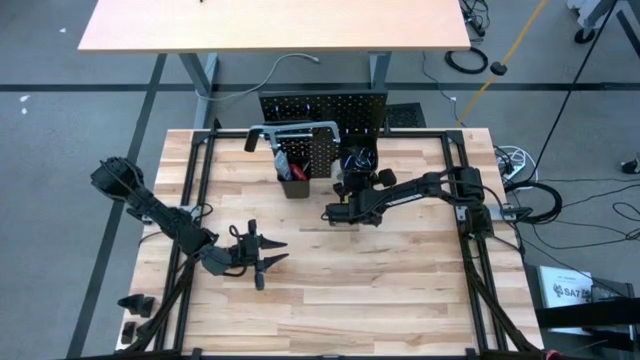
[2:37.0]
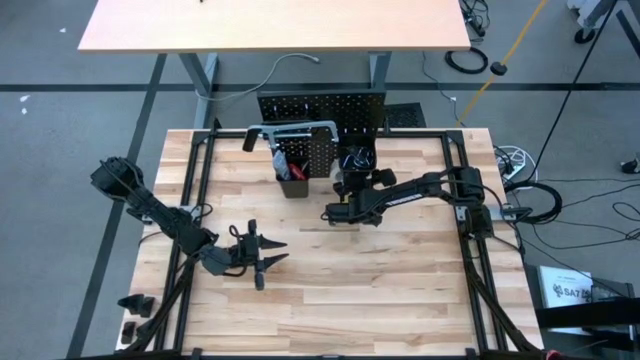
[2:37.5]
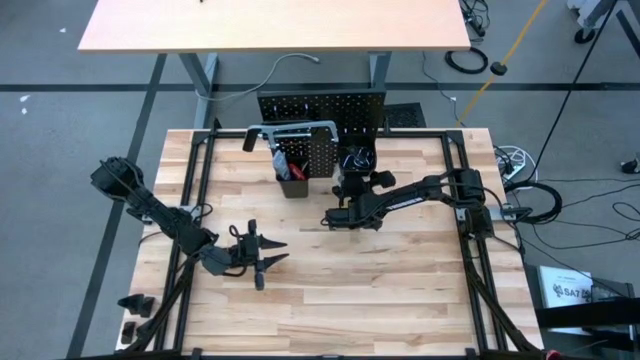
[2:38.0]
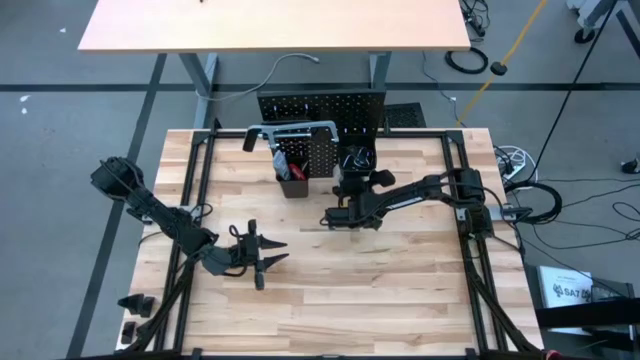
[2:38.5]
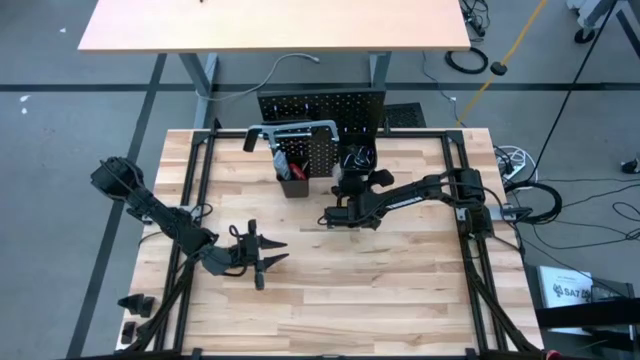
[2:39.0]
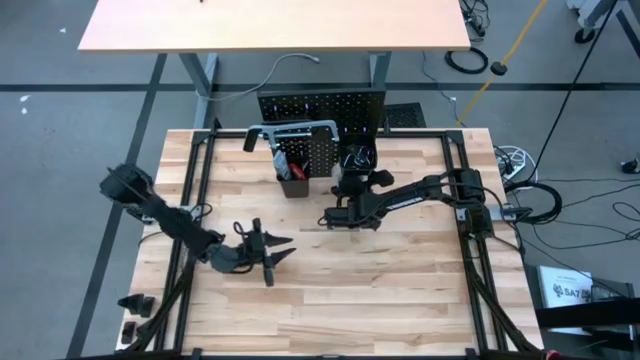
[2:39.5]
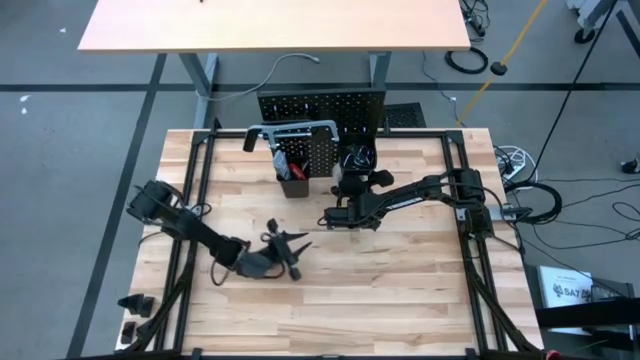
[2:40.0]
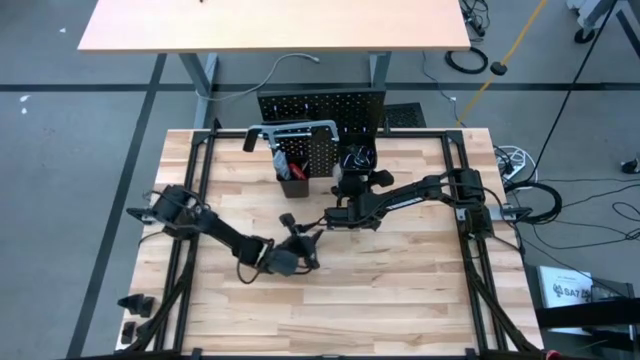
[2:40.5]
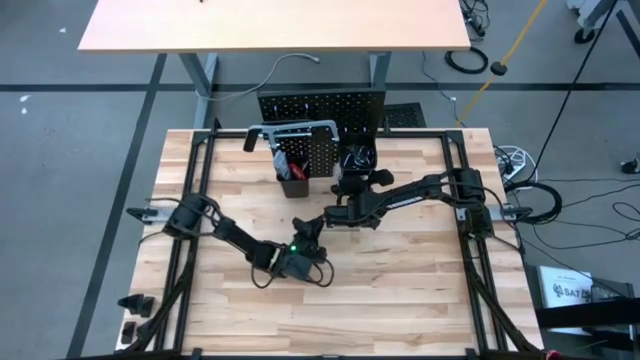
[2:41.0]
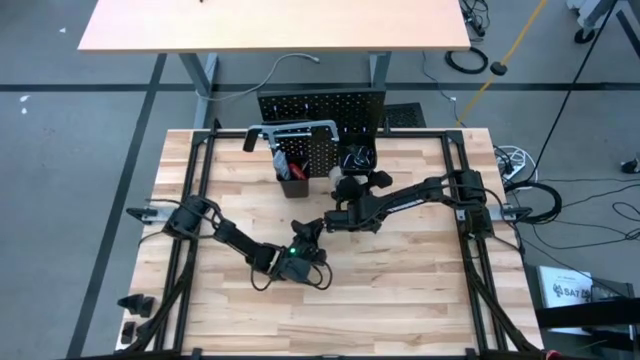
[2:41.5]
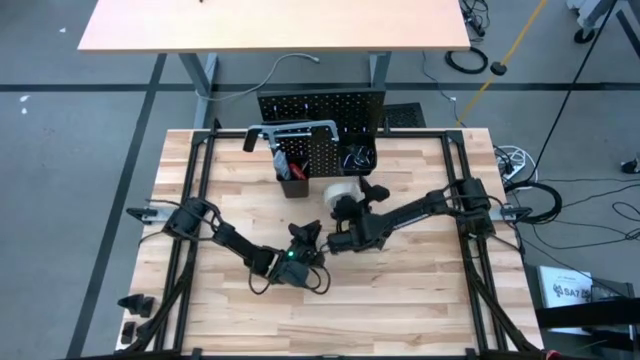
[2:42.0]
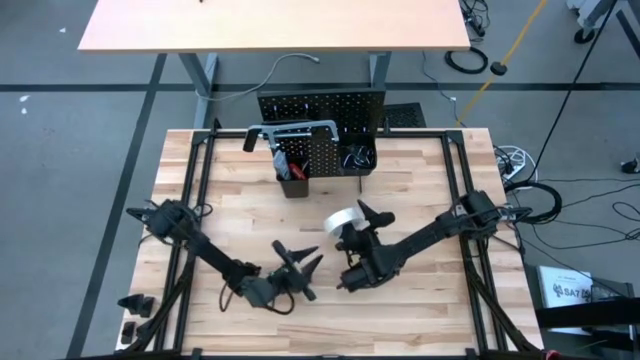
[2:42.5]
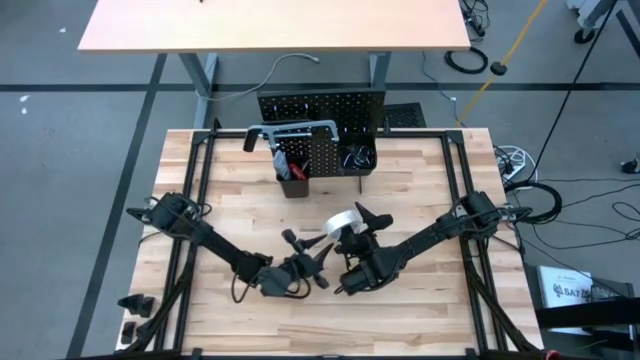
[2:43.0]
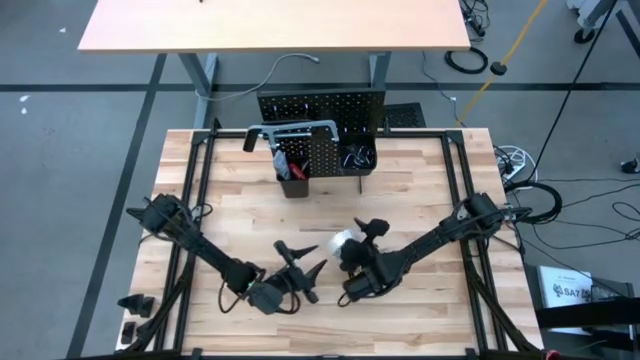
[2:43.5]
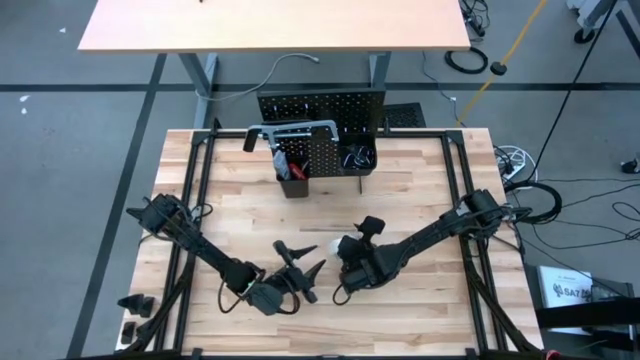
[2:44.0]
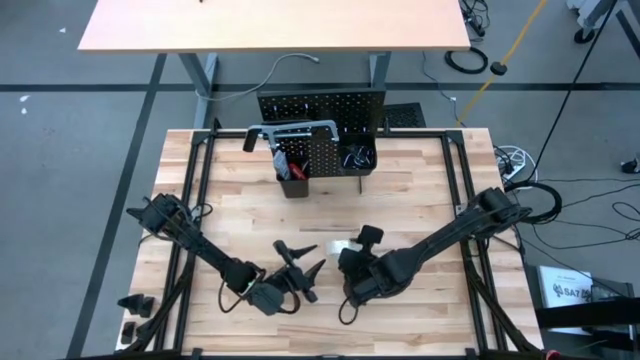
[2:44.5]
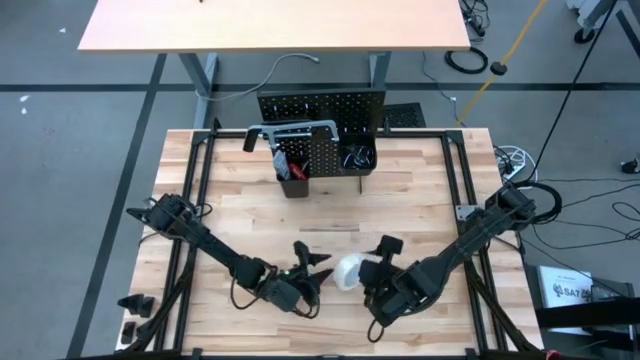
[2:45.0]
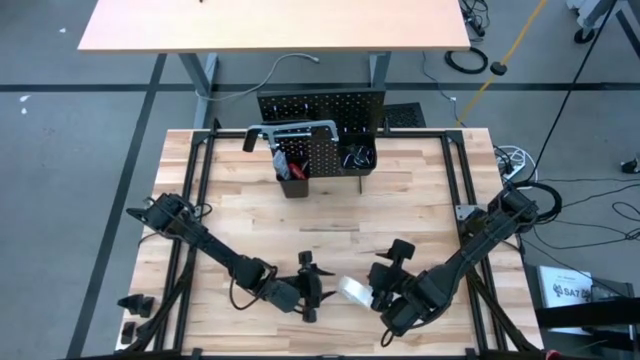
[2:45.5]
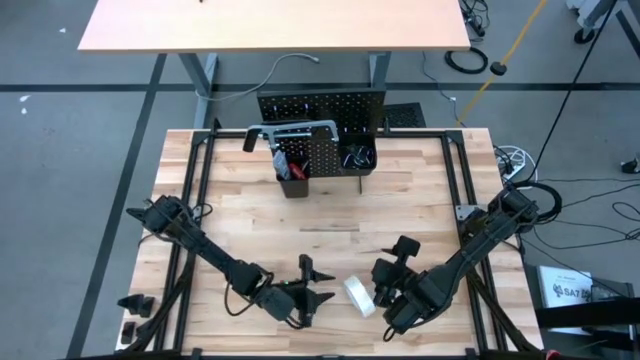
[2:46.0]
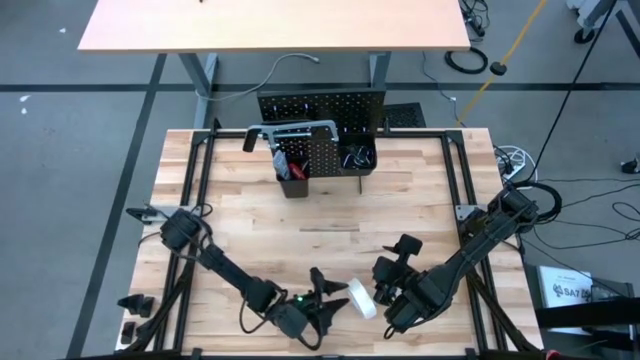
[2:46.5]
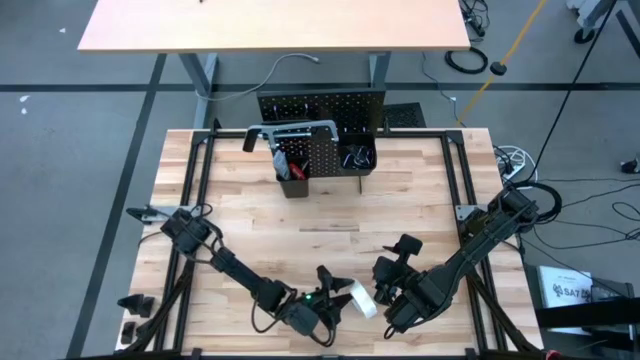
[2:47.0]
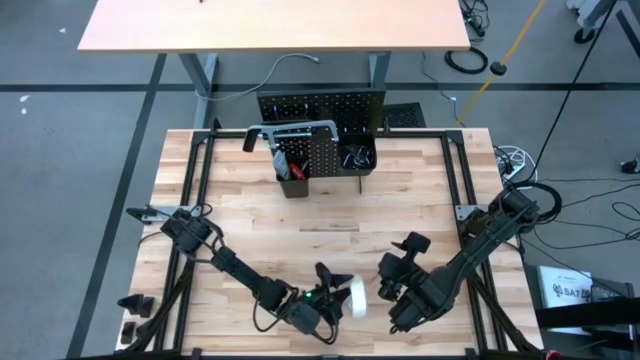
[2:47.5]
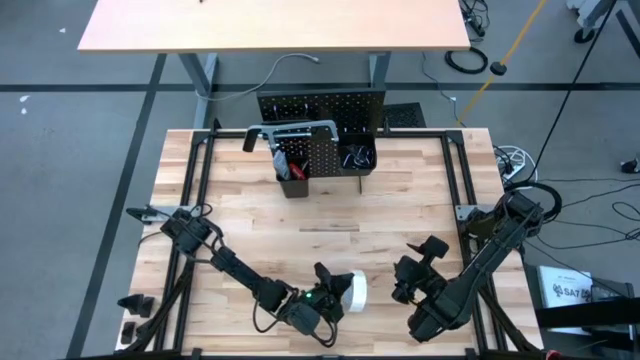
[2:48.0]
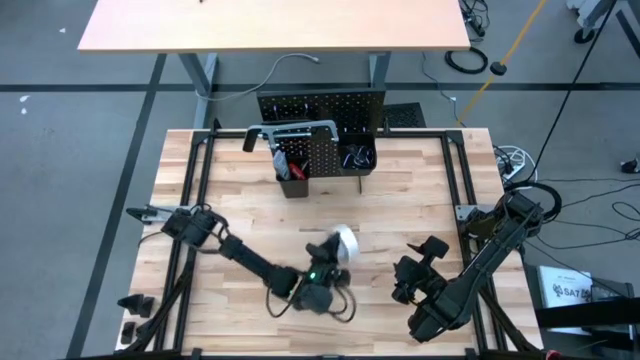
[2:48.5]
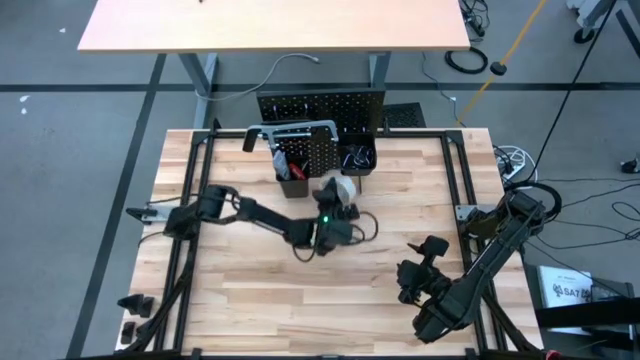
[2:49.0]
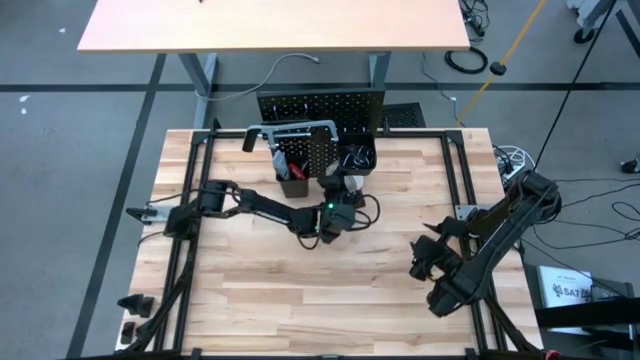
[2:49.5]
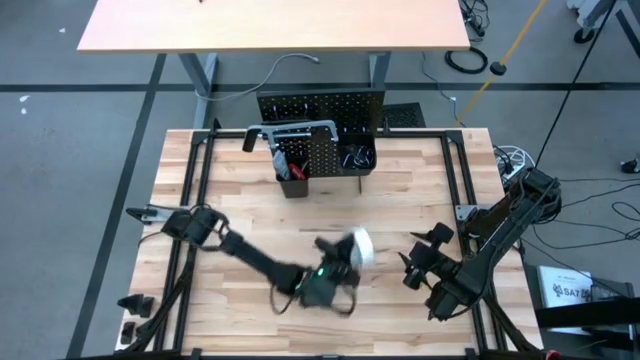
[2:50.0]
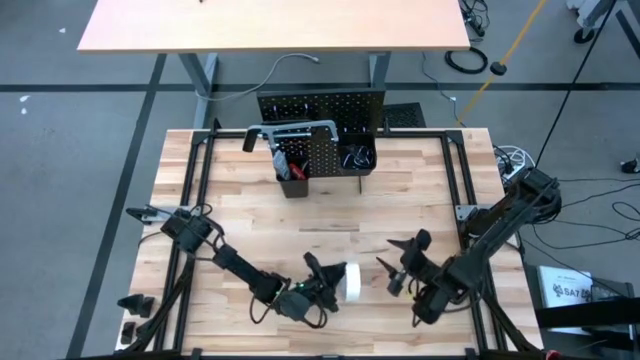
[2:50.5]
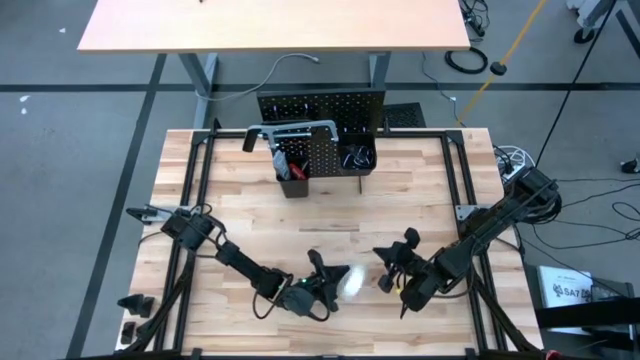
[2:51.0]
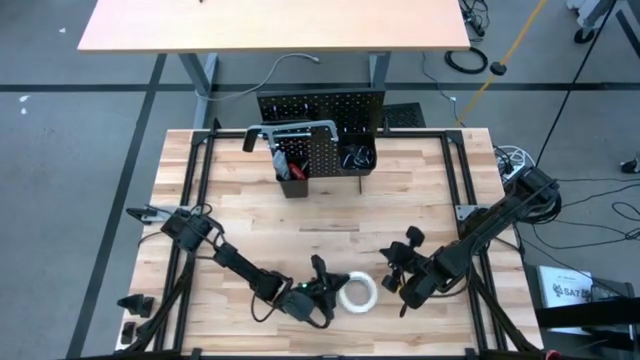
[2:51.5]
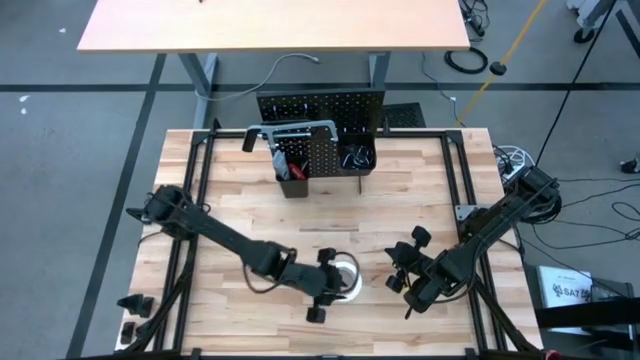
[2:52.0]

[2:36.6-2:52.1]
Task: Hang tools onto peg board
Hang the white tape on the peg board

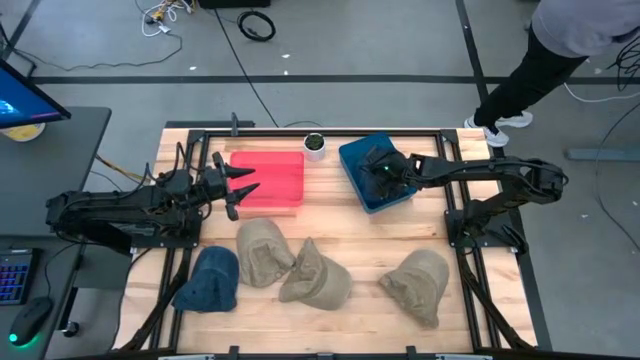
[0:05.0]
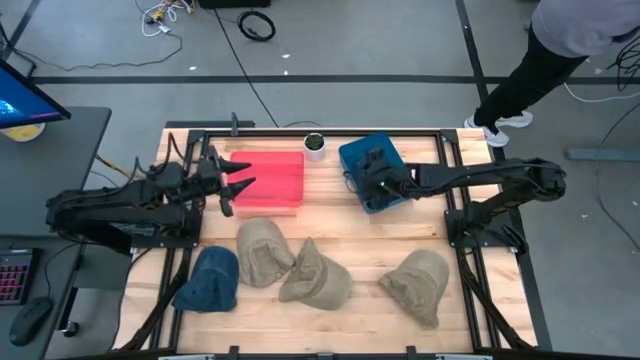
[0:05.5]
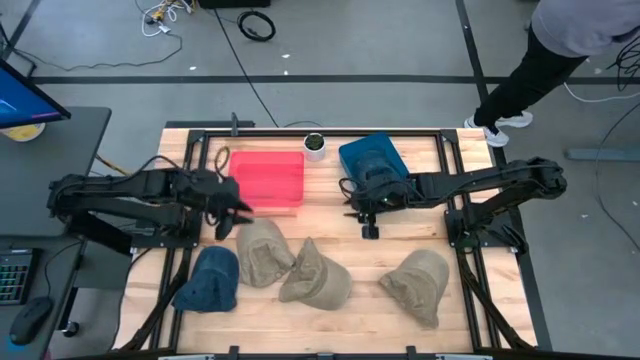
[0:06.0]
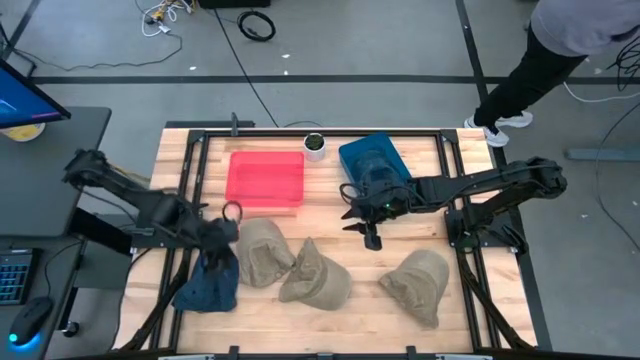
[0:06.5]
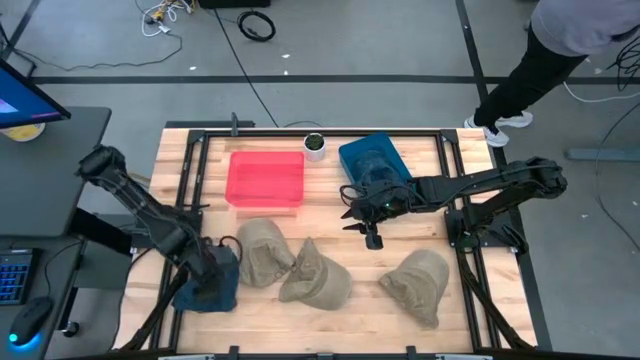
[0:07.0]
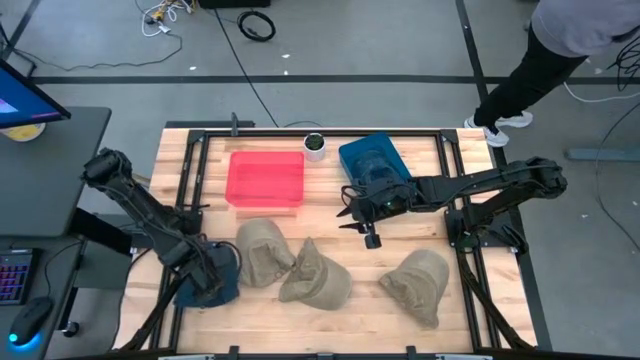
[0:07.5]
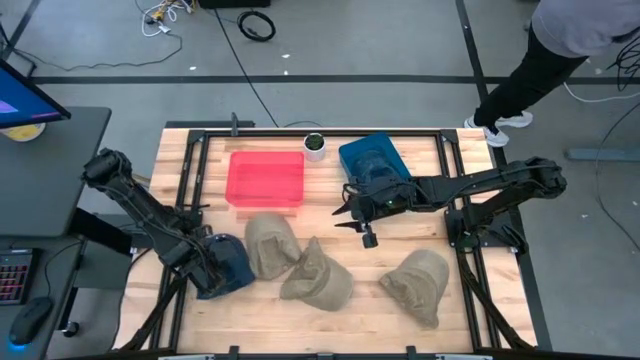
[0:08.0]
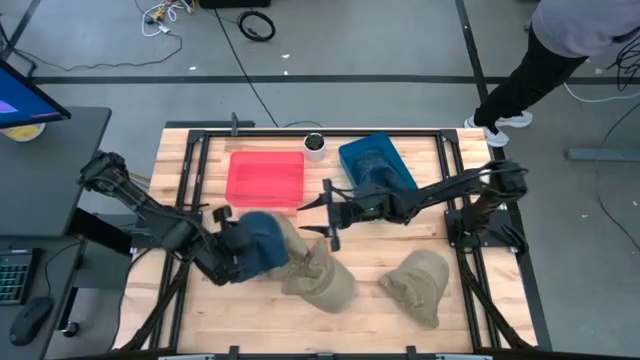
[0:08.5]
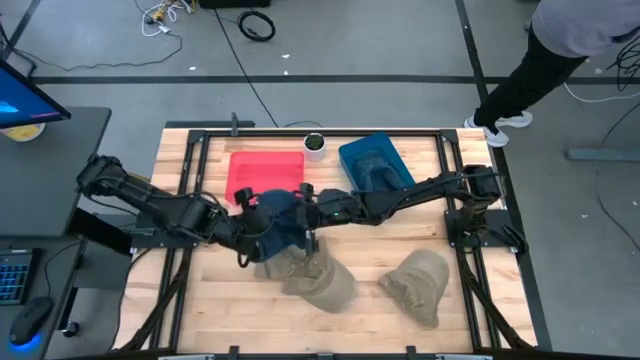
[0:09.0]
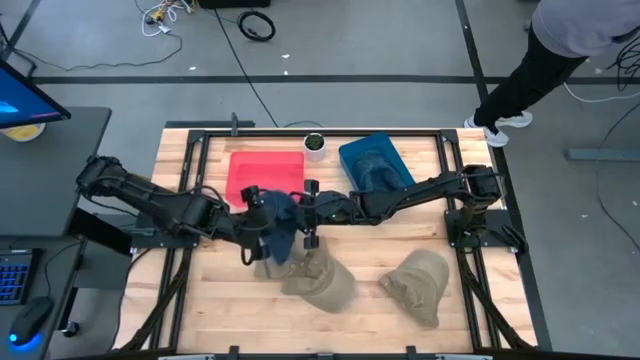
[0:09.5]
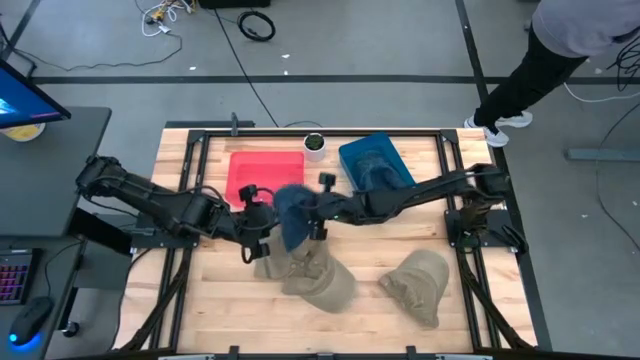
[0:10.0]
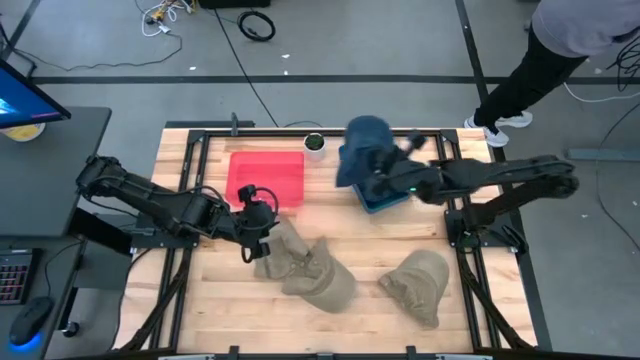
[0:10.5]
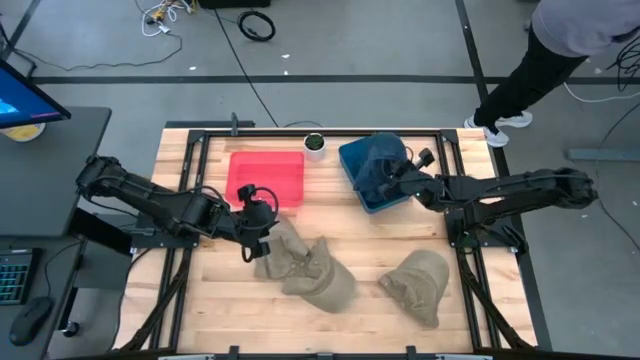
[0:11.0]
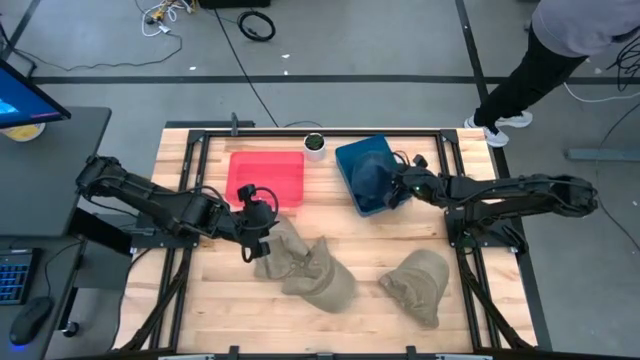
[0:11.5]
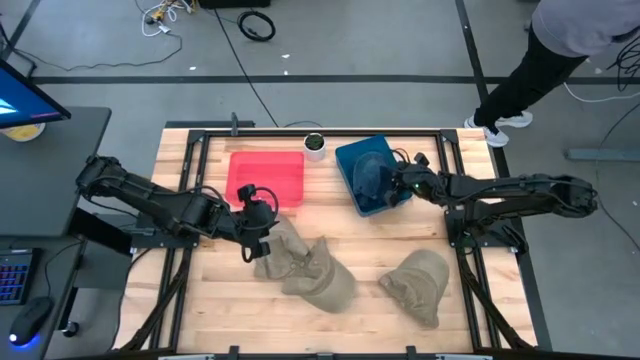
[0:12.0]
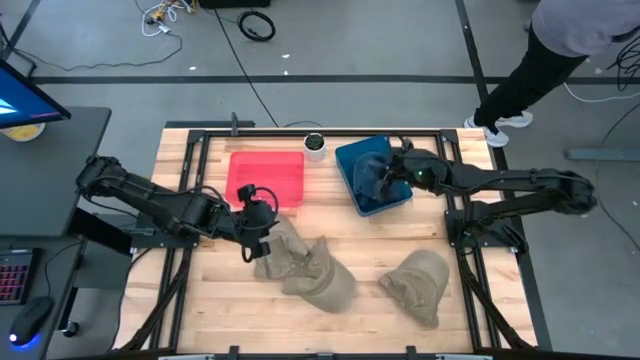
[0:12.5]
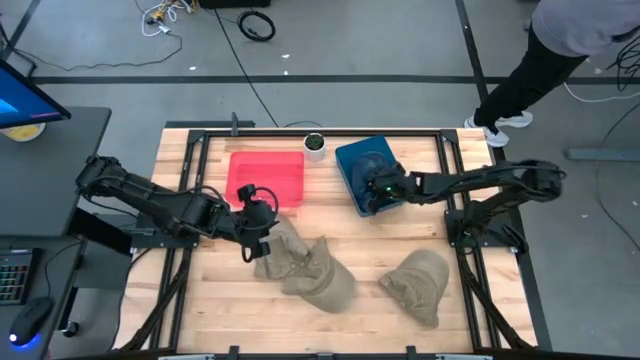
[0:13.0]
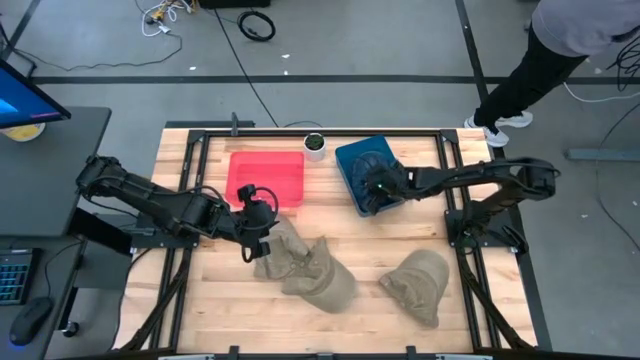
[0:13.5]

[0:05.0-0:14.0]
Task: Pick & Place hat
Put the blue cap into the blue bin
